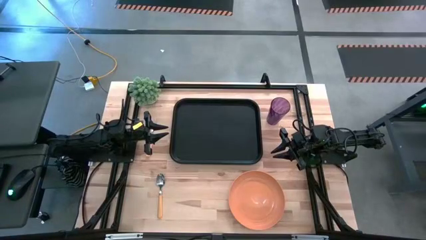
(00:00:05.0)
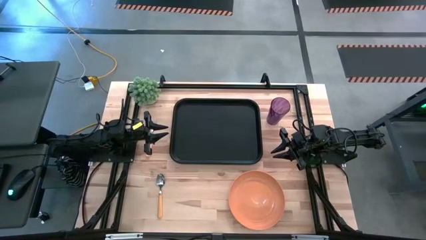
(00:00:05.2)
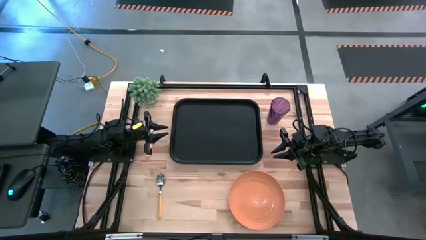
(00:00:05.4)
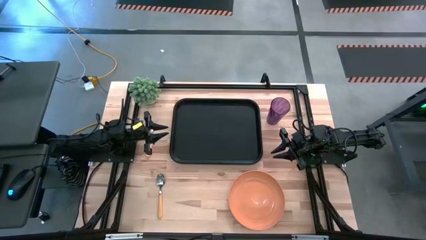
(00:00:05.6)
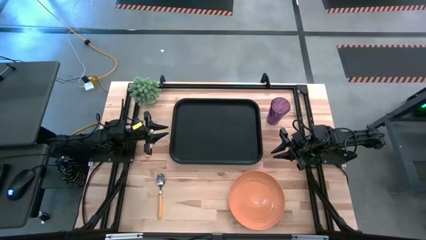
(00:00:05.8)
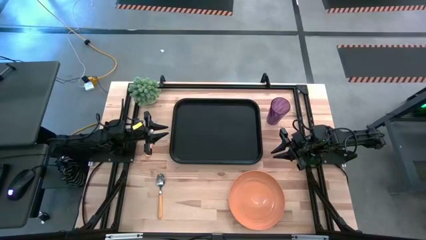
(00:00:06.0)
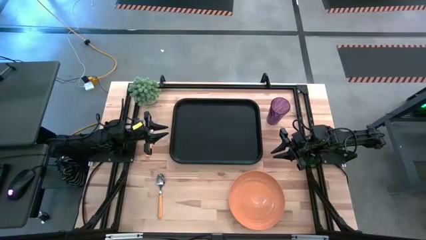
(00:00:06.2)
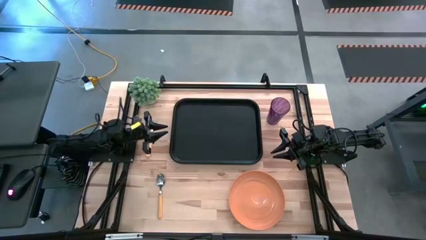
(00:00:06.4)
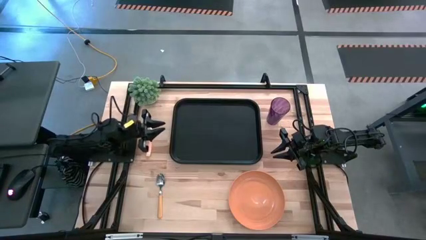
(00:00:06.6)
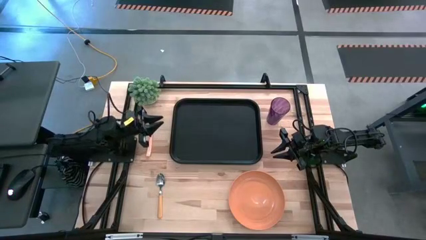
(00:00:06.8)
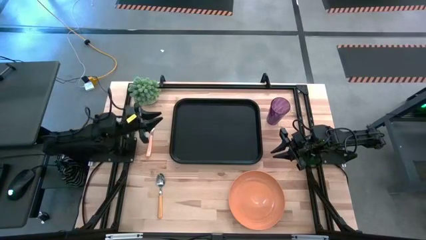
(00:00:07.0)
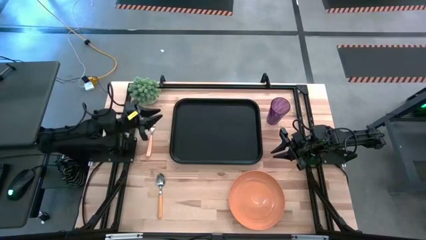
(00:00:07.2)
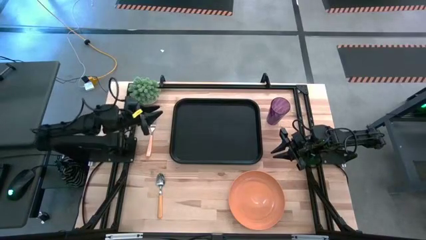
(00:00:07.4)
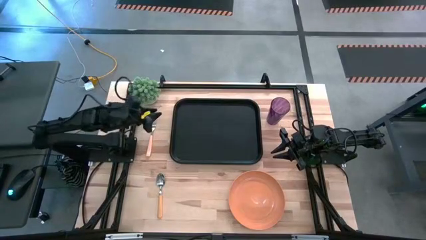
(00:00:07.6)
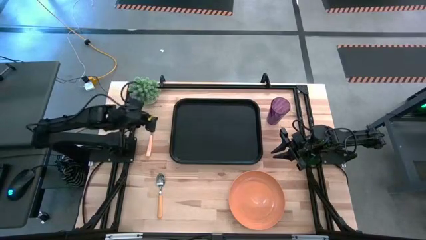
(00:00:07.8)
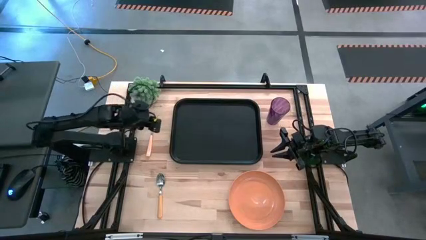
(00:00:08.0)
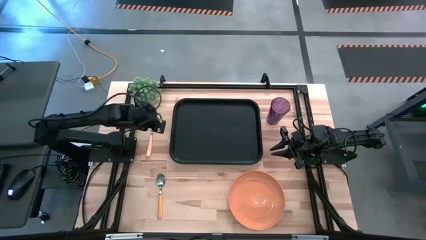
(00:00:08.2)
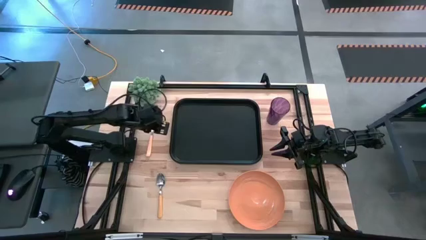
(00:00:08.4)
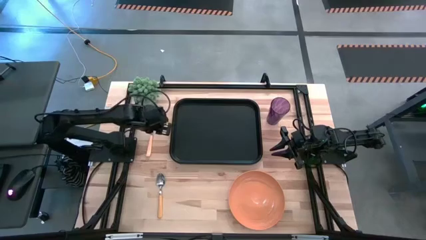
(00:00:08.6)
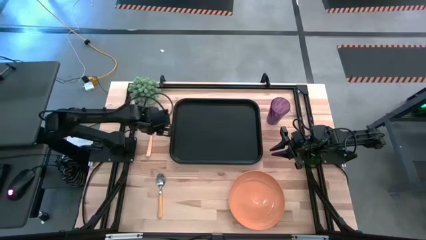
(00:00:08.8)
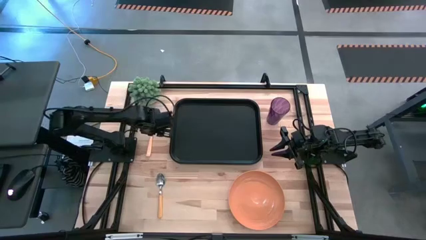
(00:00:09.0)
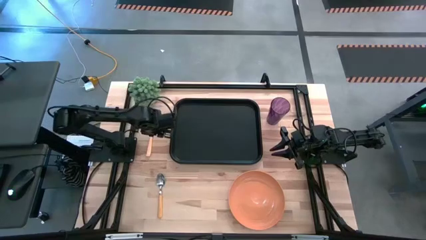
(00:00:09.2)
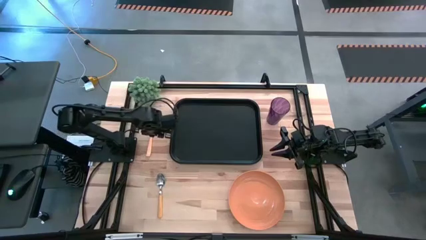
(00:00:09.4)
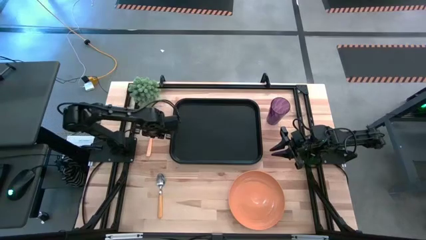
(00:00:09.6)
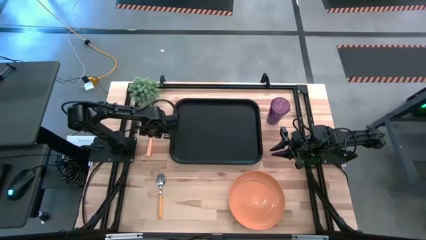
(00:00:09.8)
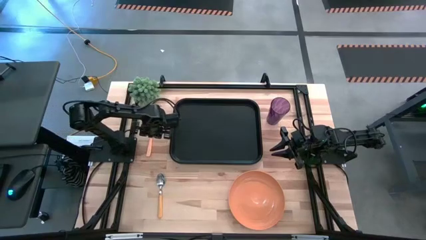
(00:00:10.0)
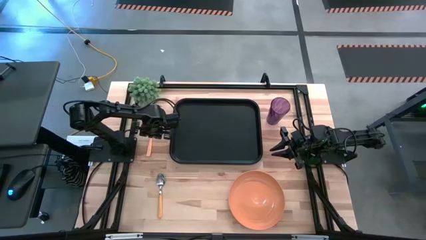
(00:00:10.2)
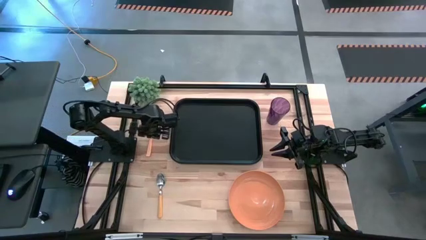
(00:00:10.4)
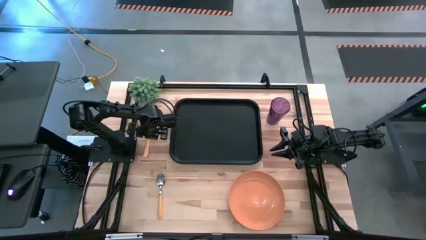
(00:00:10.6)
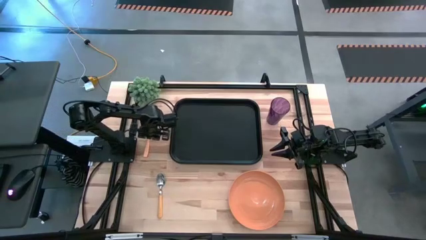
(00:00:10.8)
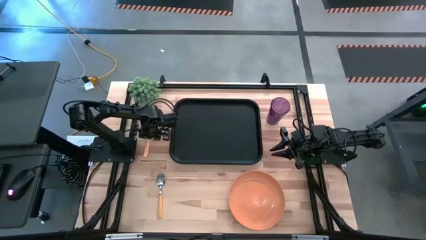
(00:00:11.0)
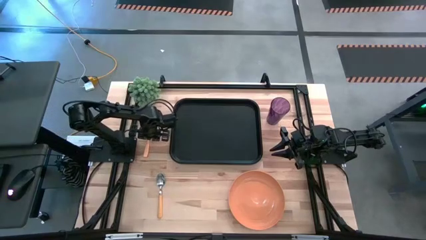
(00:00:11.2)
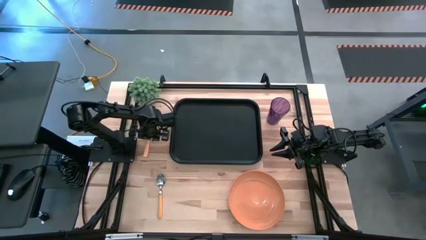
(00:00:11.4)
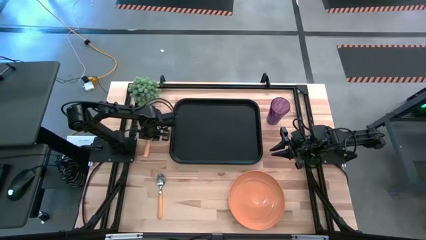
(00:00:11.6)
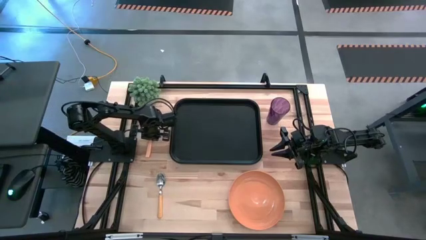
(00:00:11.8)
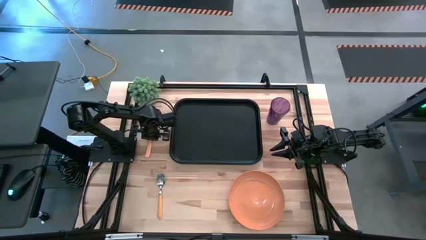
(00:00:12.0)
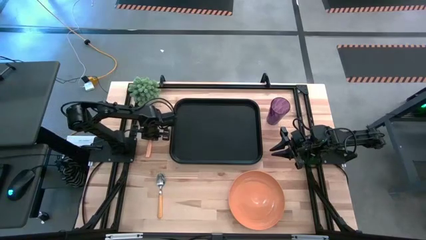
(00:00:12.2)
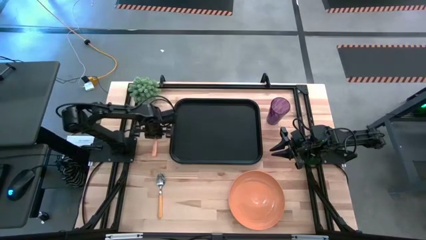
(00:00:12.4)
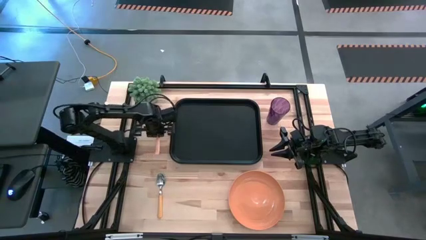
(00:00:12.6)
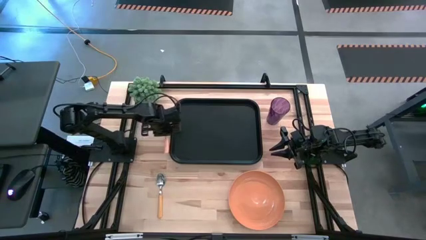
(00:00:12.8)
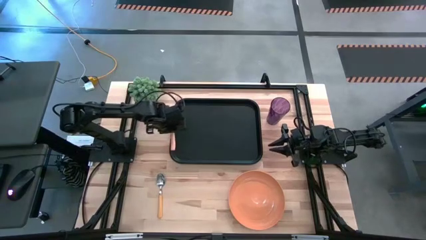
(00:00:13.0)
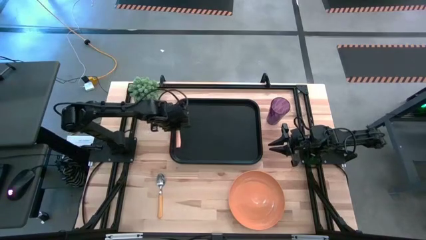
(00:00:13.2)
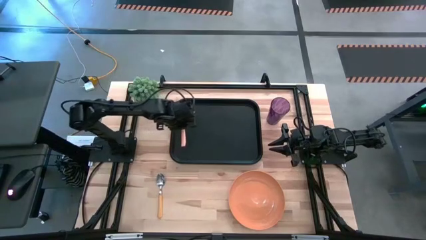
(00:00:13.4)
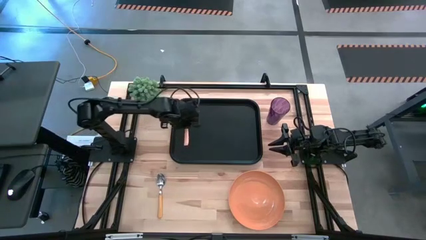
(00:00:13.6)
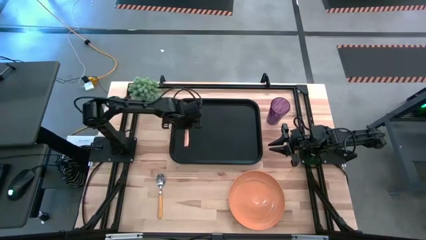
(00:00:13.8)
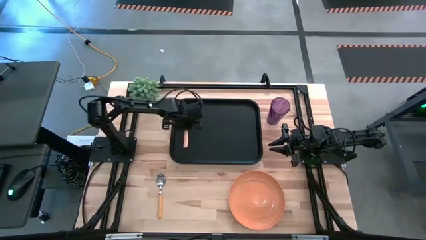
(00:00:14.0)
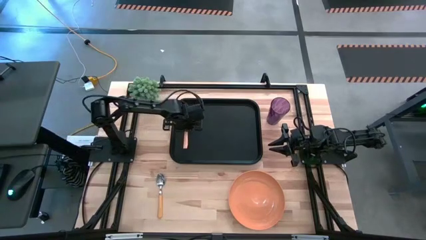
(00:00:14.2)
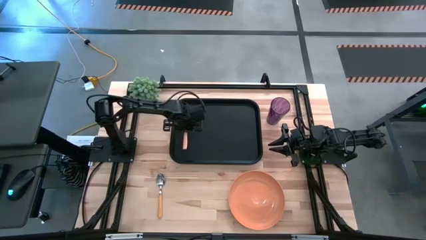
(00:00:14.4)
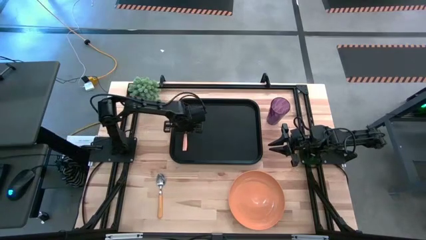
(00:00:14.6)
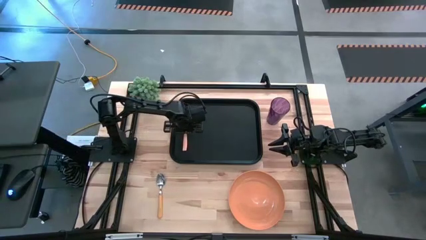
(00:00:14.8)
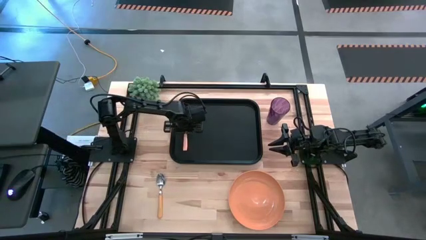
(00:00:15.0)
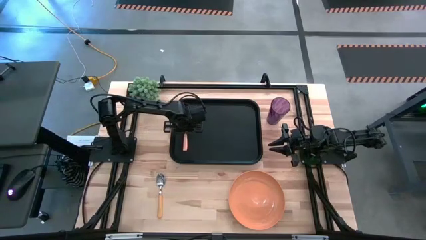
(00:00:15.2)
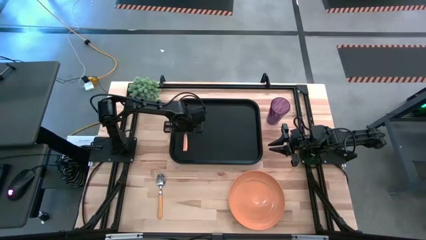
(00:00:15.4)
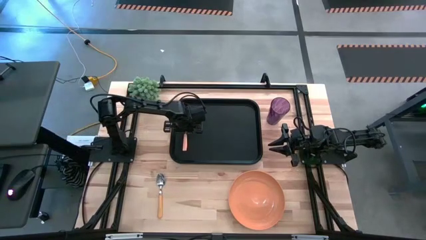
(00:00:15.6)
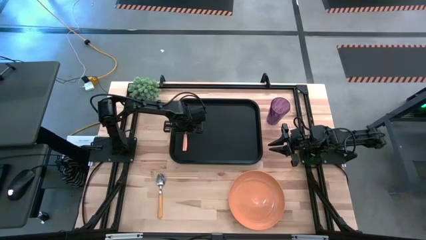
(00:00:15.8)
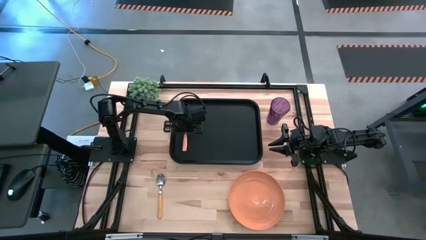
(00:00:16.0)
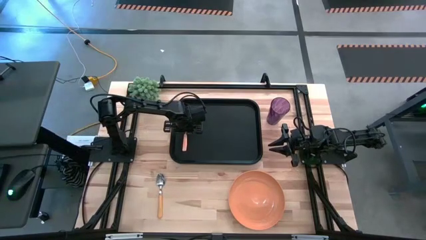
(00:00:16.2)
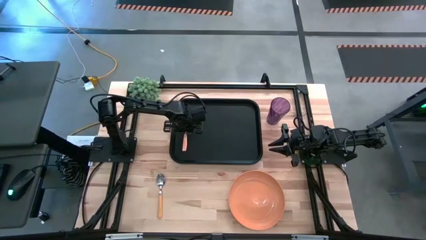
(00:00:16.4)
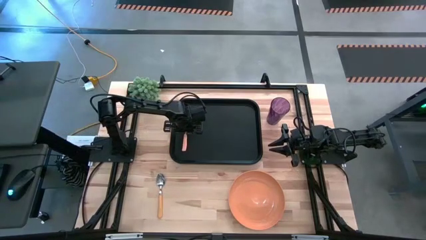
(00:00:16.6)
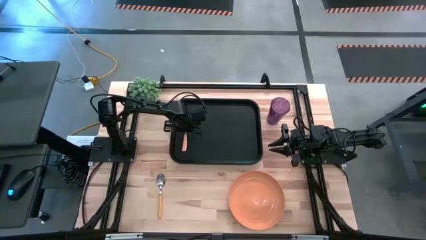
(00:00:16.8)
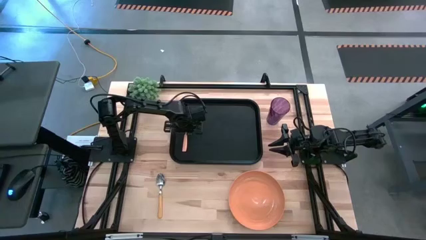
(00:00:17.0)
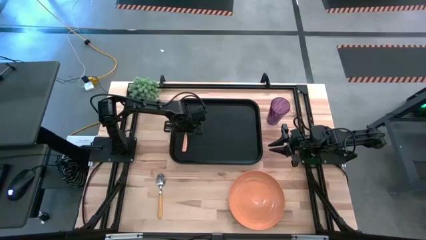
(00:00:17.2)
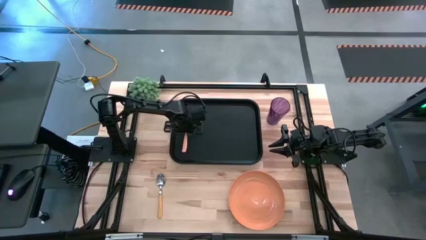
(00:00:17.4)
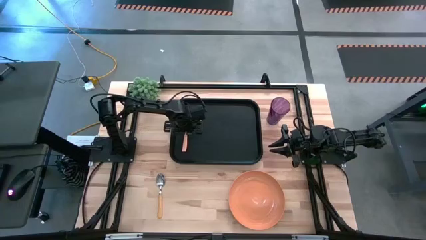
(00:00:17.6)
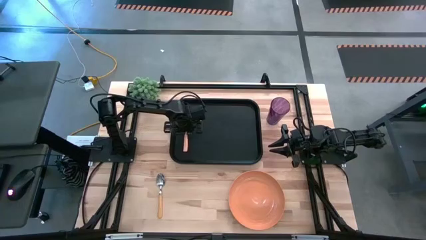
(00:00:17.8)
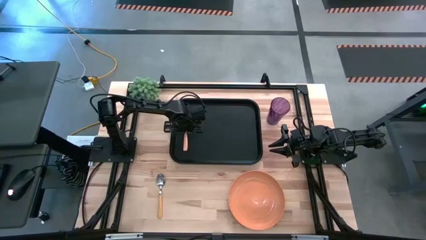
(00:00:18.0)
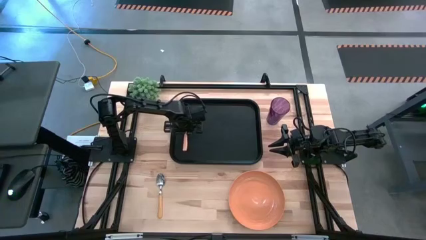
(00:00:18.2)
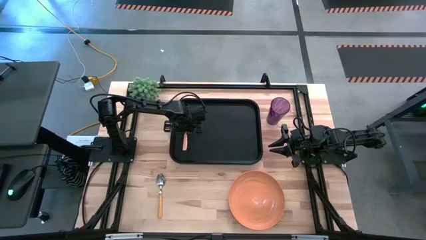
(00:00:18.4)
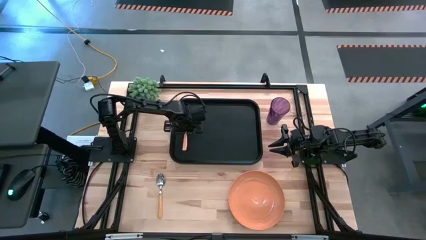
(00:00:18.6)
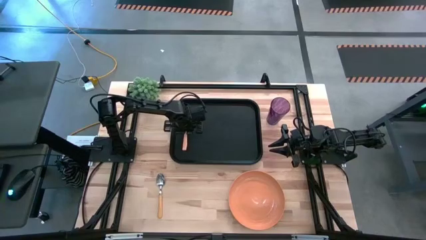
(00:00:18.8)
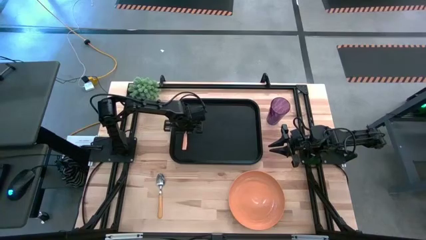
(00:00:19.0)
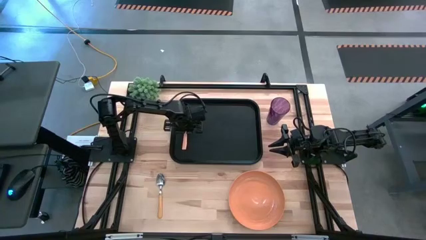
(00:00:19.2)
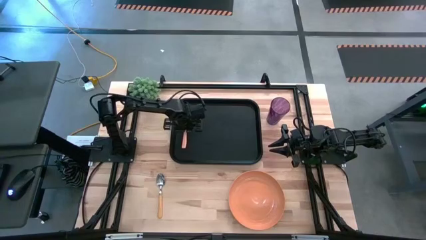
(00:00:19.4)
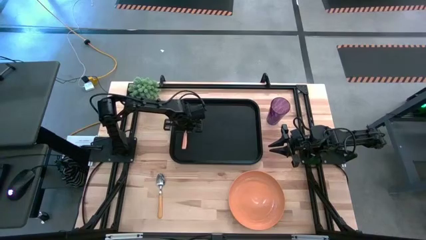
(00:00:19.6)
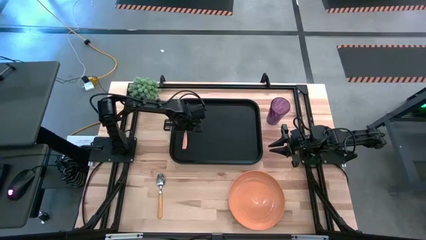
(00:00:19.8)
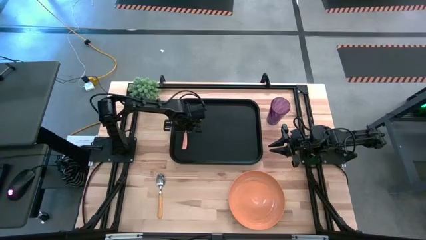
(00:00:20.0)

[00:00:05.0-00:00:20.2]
Task: Pick and place plate/cup/fork/spoon on tray
Put the orange fork into the black tray
